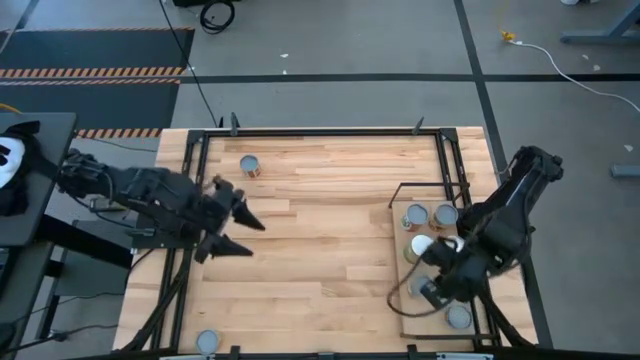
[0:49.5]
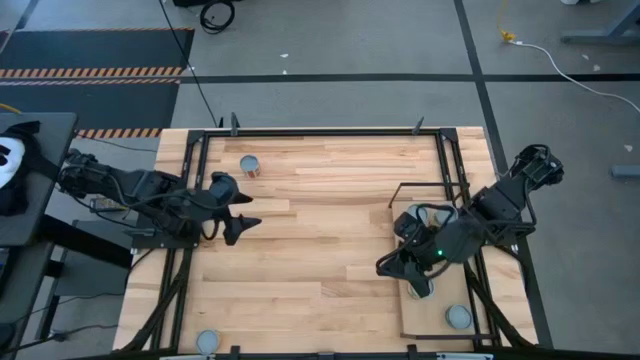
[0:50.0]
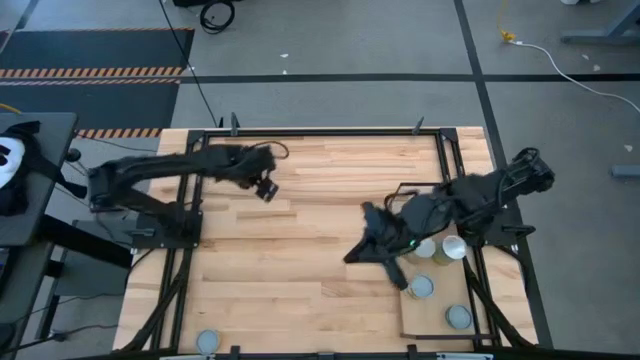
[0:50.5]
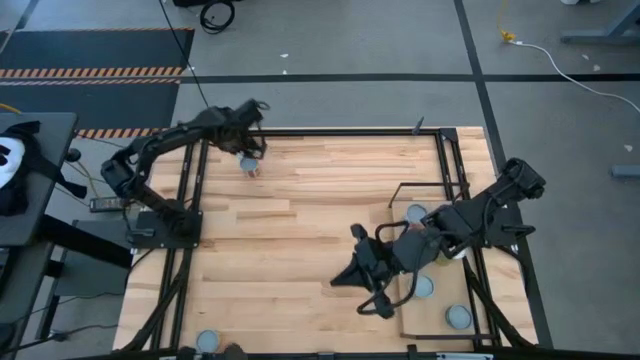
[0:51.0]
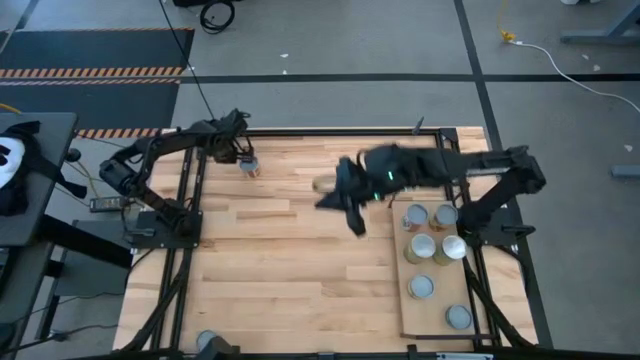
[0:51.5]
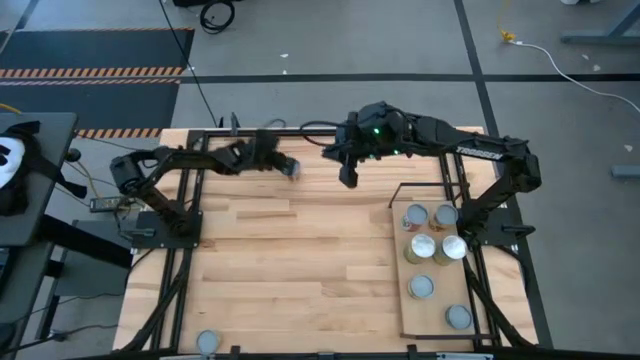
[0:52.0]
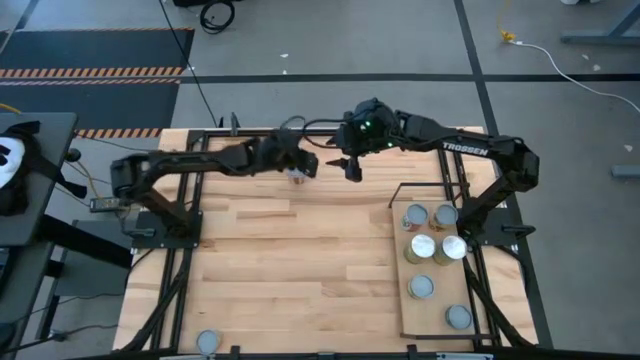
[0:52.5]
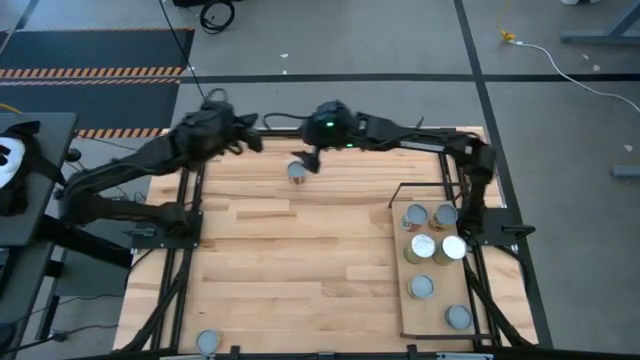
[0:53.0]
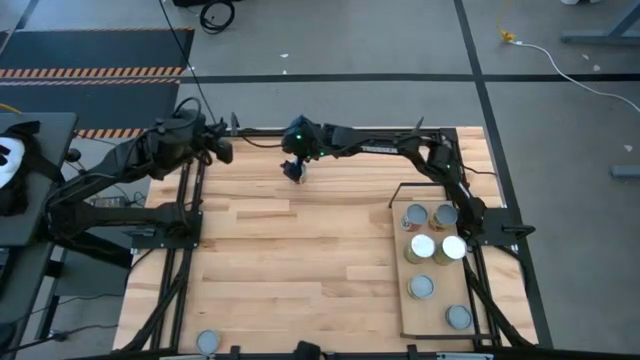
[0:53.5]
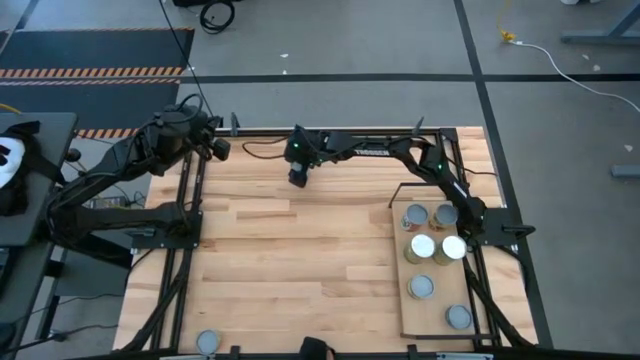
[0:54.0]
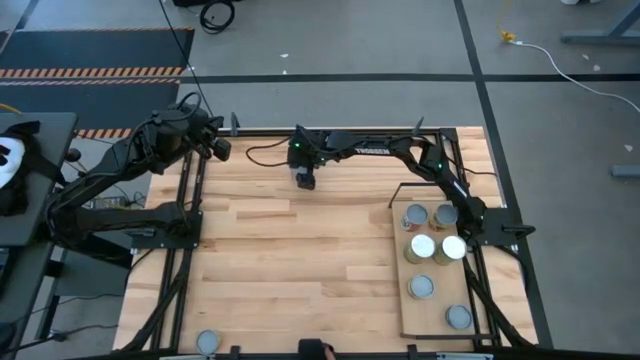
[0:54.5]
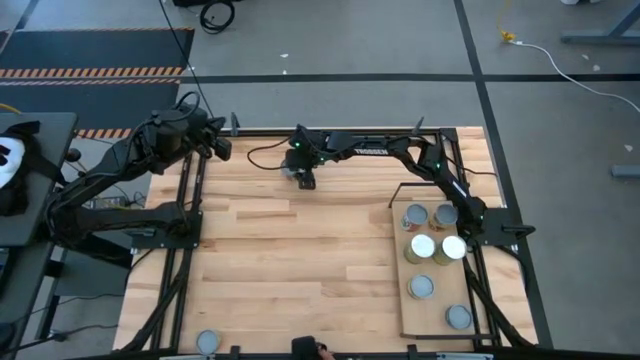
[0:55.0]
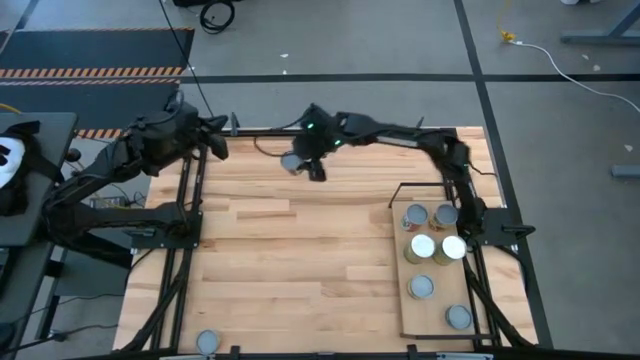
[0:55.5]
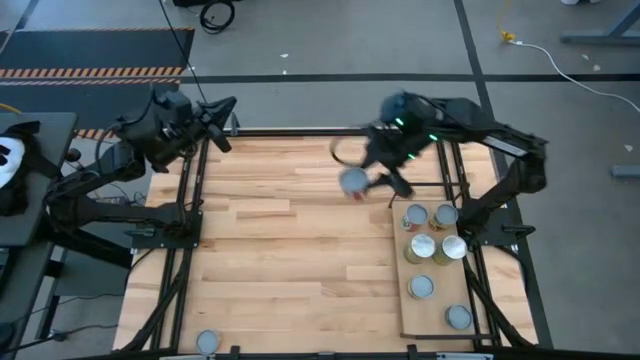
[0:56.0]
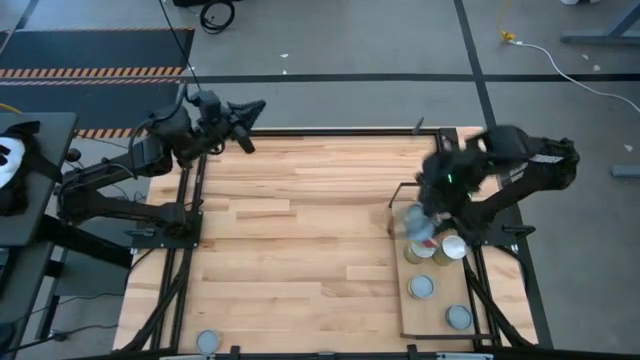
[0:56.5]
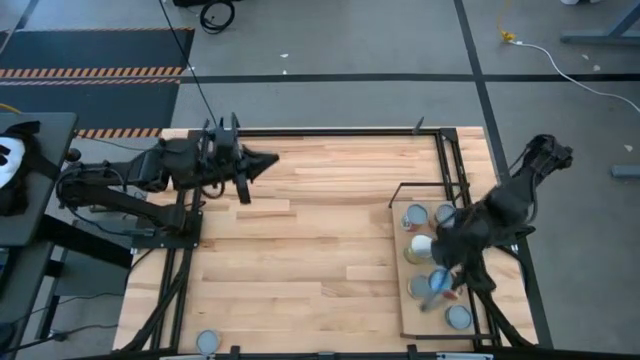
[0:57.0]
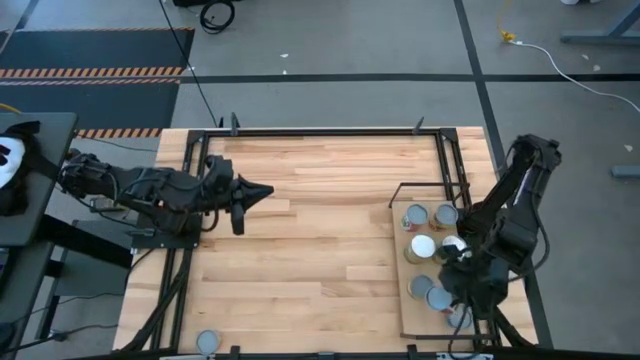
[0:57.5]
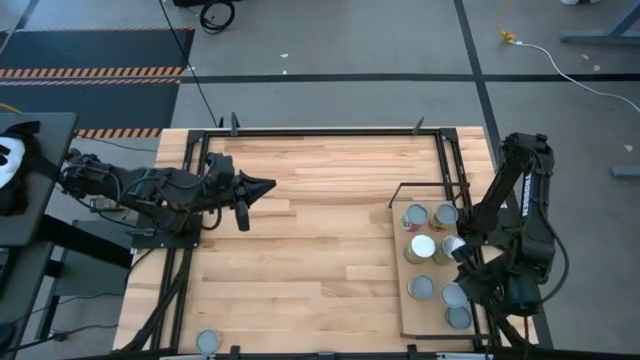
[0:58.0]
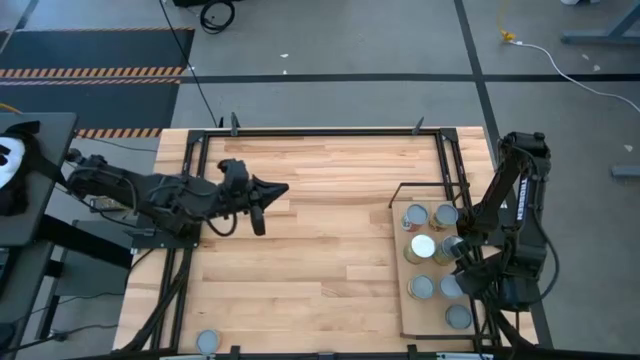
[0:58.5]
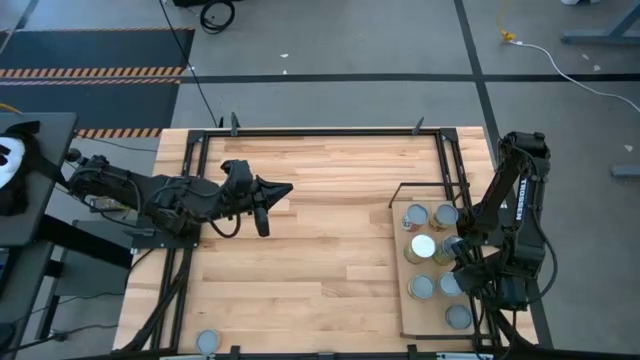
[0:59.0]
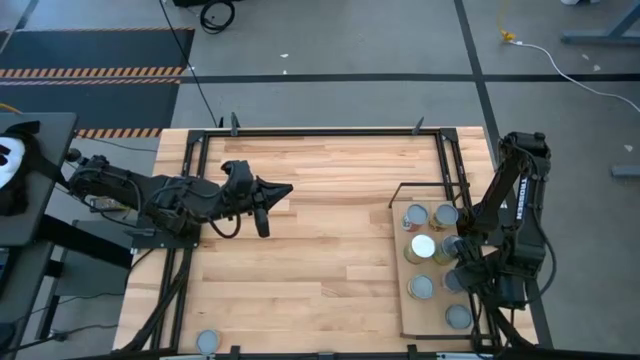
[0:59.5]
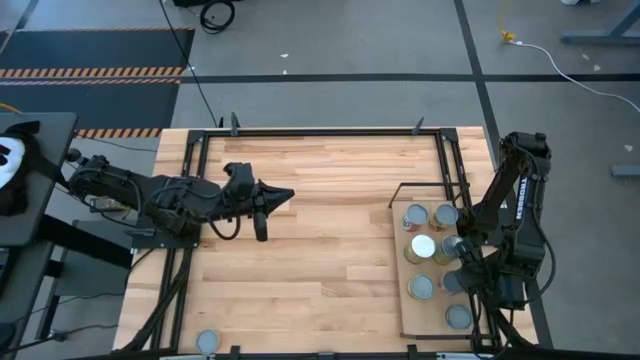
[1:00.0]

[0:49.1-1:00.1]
Task: Pick and place cans onto a shelf
Put the canned tomato on the shelf

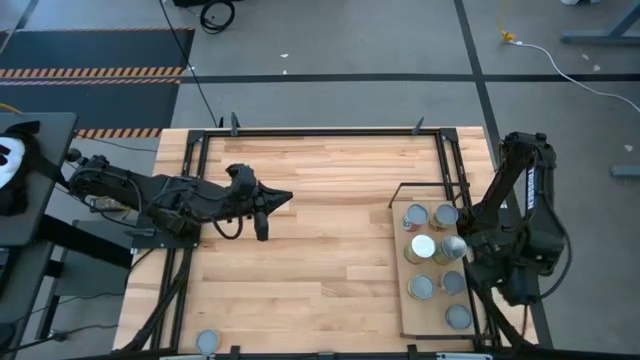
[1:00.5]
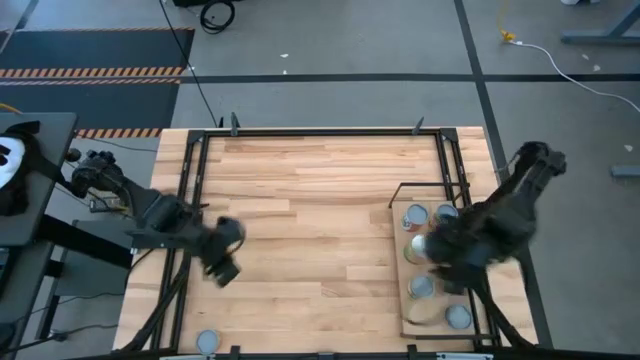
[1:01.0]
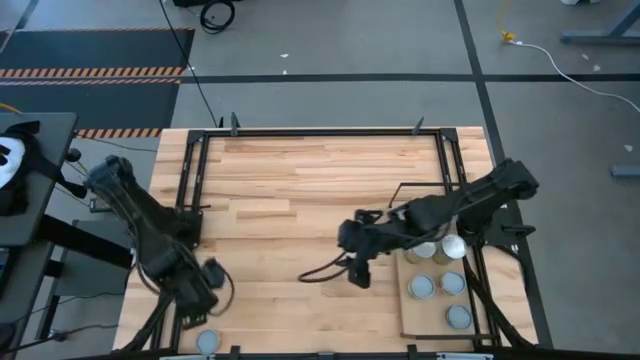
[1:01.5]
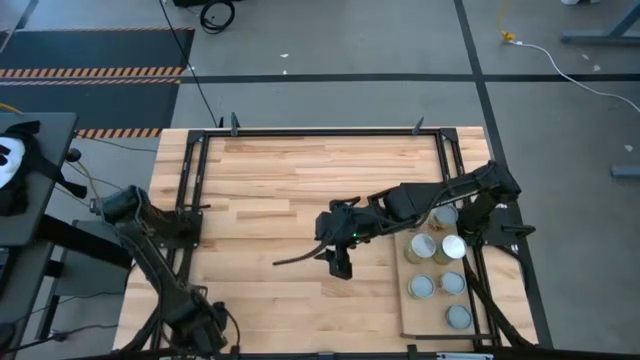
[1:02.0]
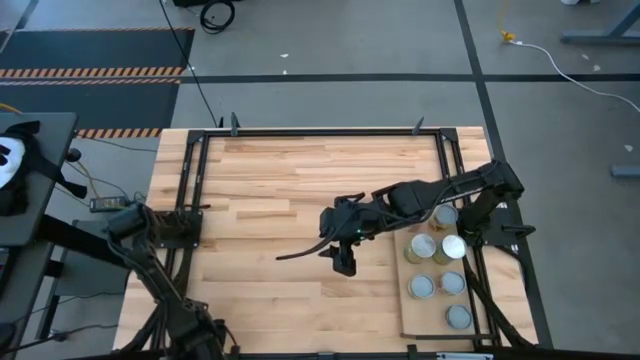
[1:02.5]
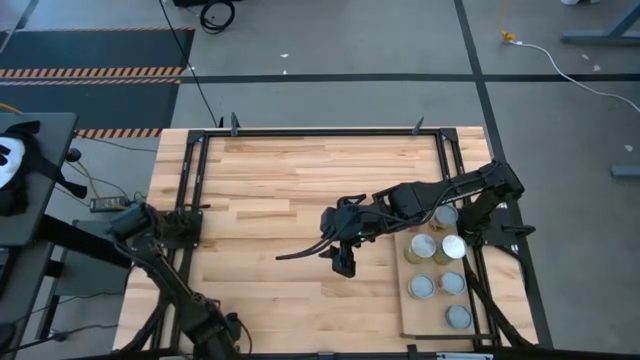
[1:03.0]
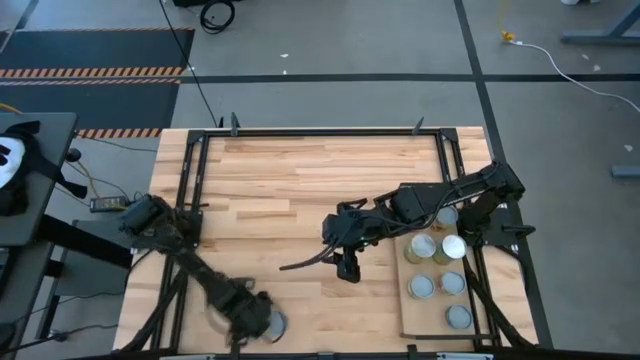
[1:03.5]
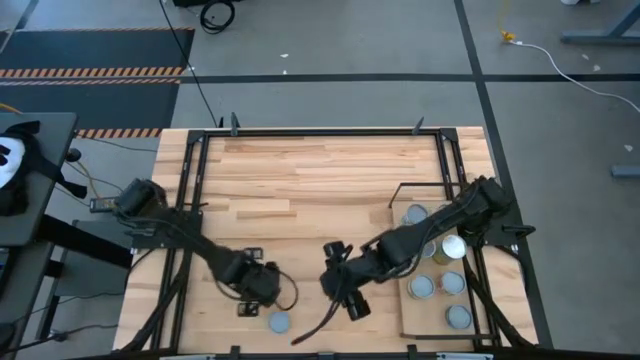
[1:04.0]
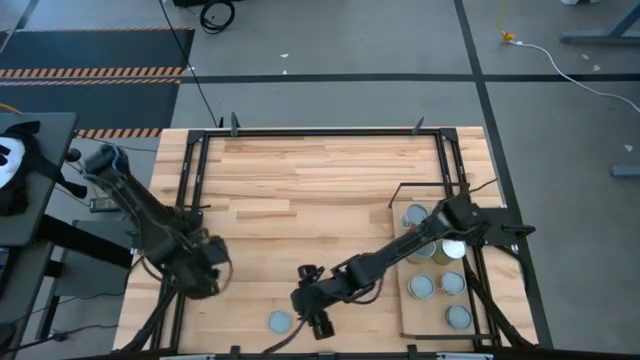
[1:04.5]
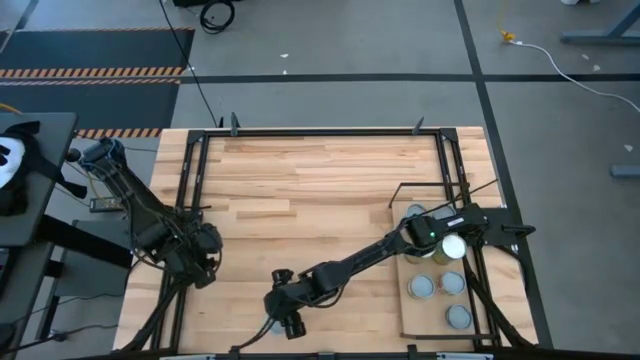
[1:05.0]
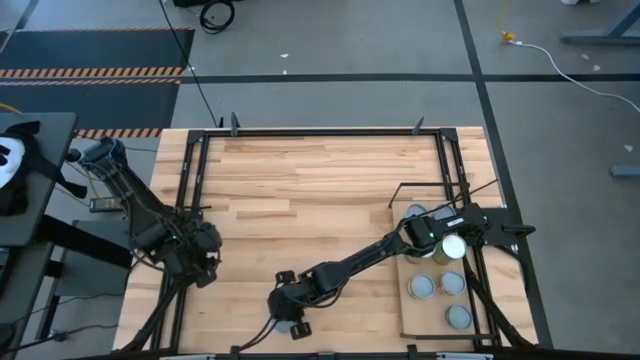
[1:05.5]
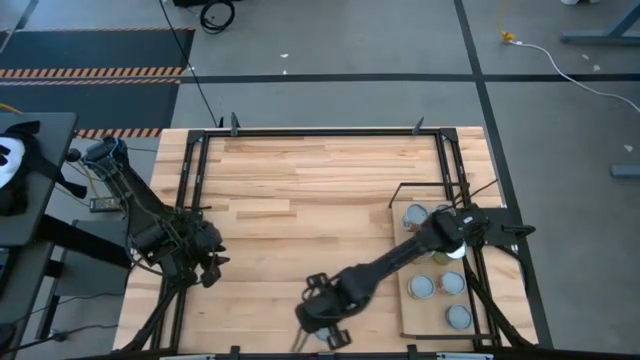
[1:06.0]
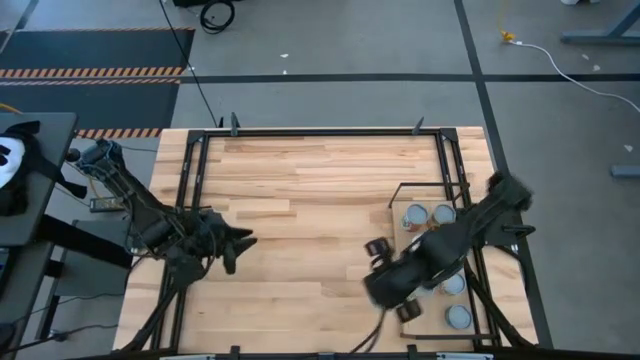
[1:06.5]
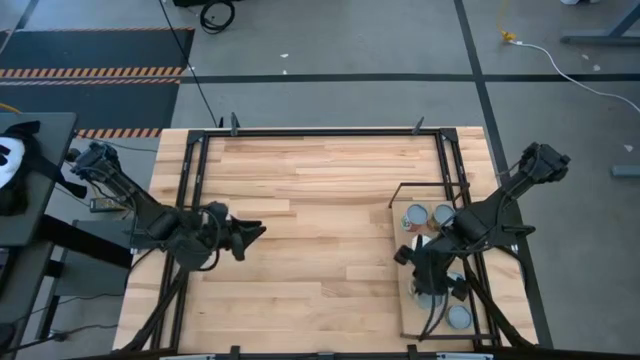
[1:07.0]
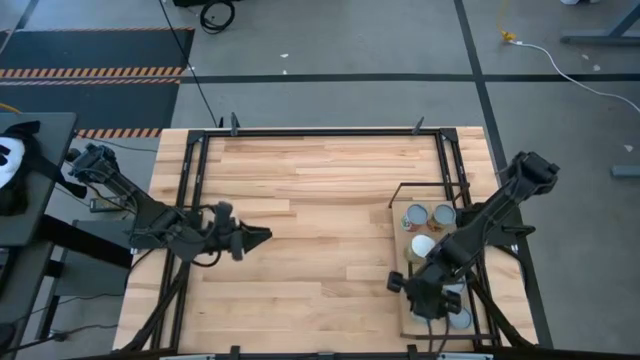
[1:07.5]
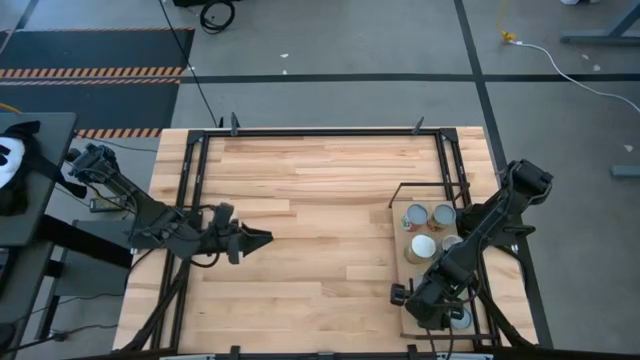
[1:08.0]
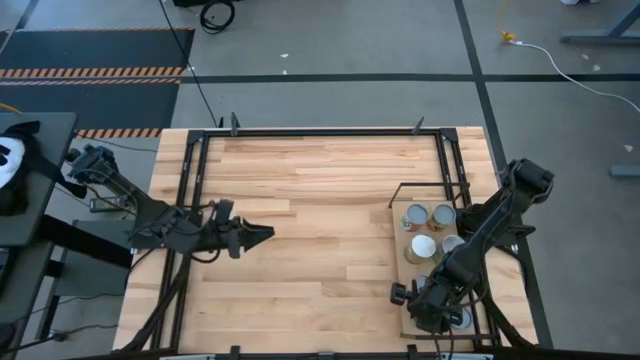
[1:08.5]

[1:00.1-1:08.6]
Put the canned corn on the shelf

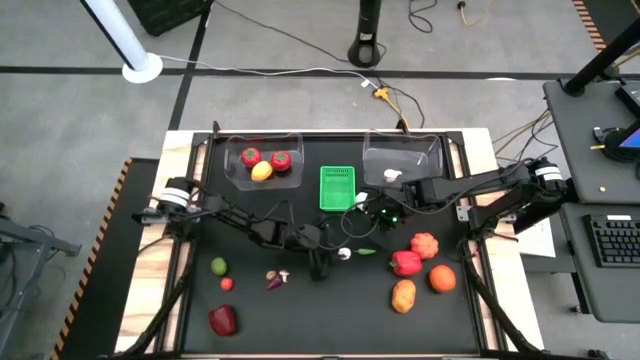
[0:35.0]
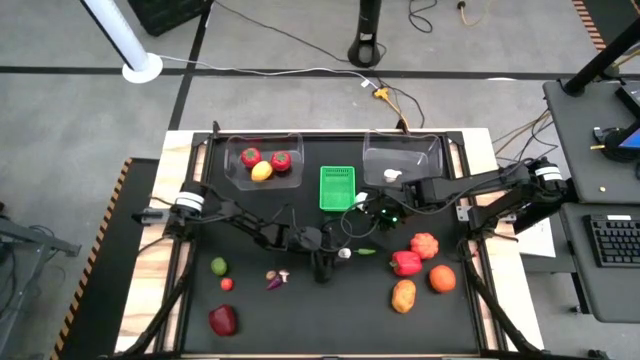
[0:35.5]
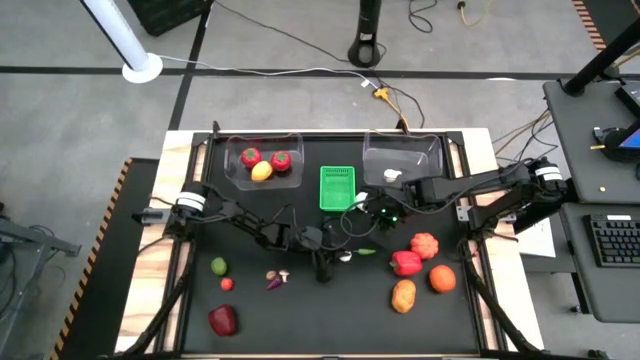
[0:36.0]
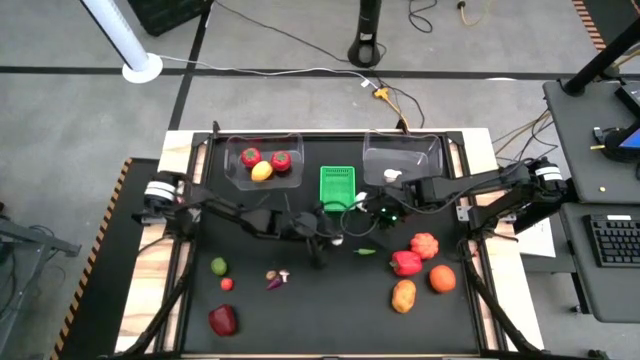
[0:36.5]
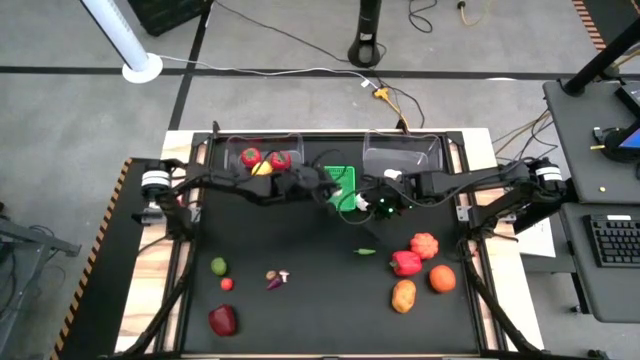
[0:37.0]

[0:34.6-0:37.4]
Task: Sort produce into baskets
Put the bottom garlic into the green basket
